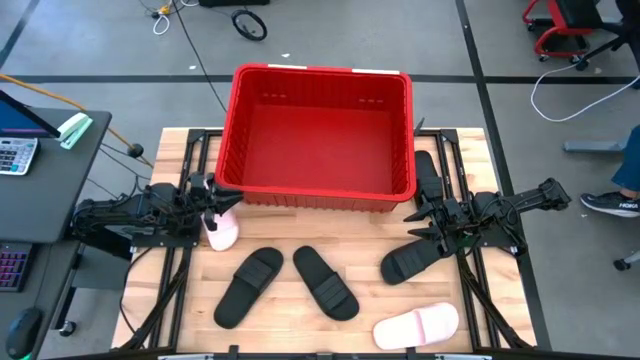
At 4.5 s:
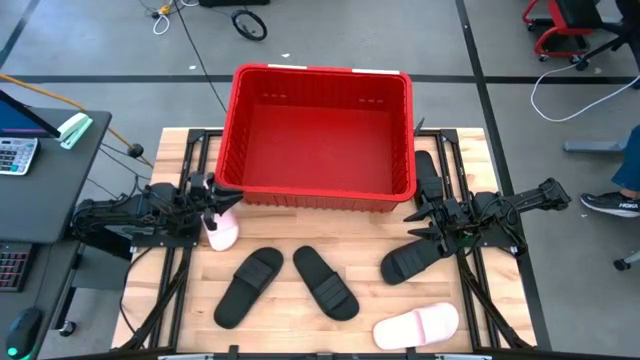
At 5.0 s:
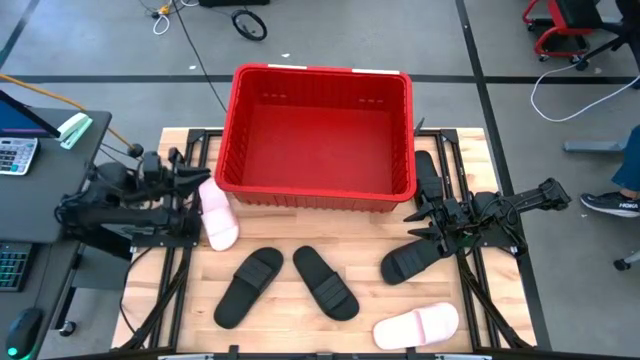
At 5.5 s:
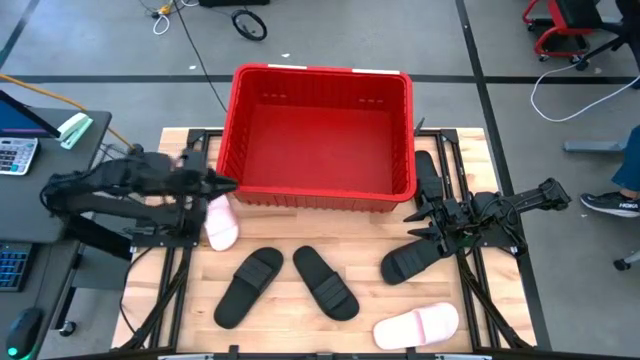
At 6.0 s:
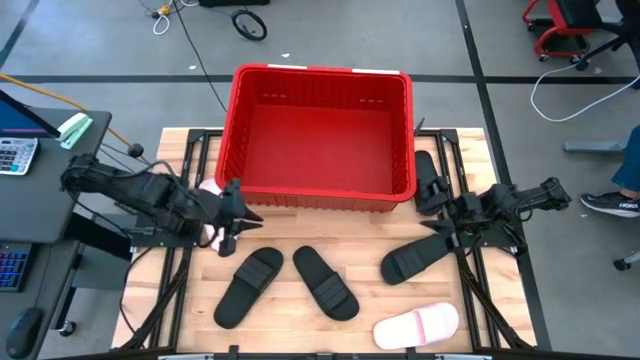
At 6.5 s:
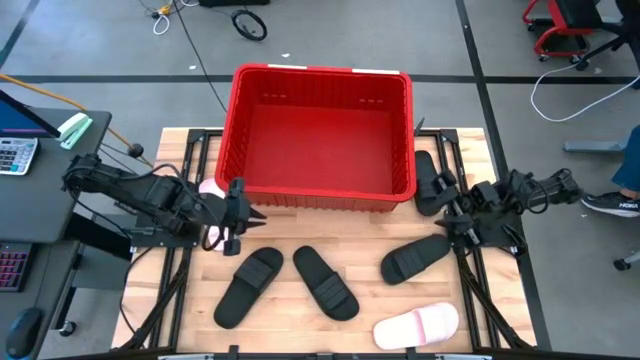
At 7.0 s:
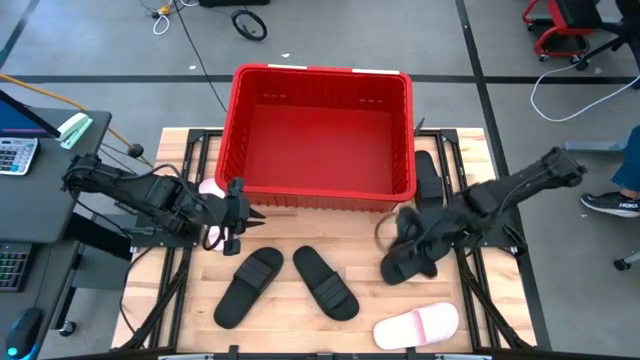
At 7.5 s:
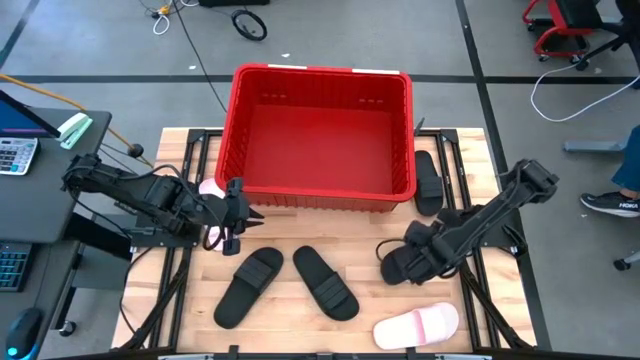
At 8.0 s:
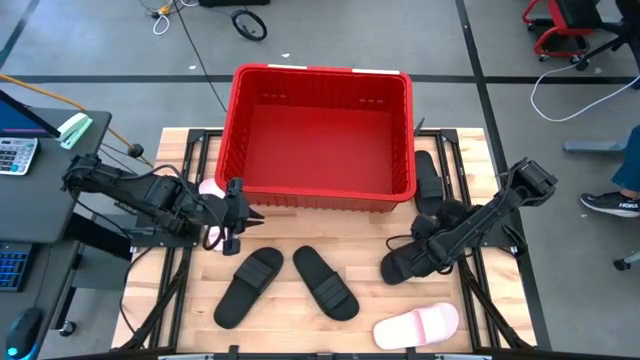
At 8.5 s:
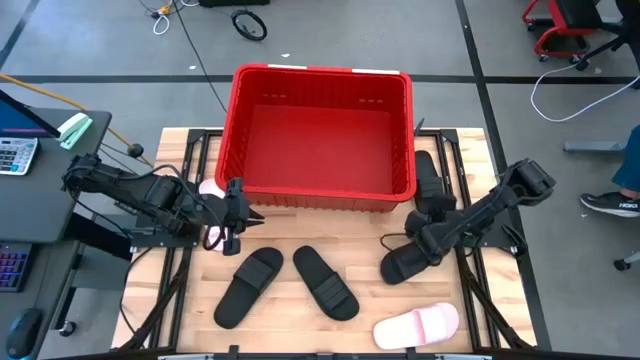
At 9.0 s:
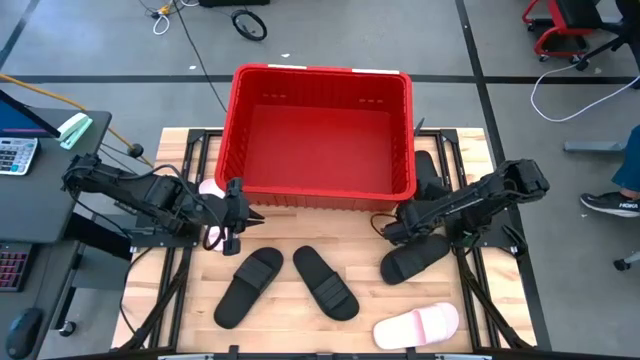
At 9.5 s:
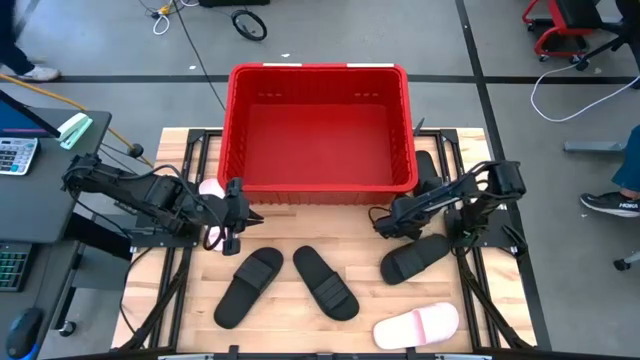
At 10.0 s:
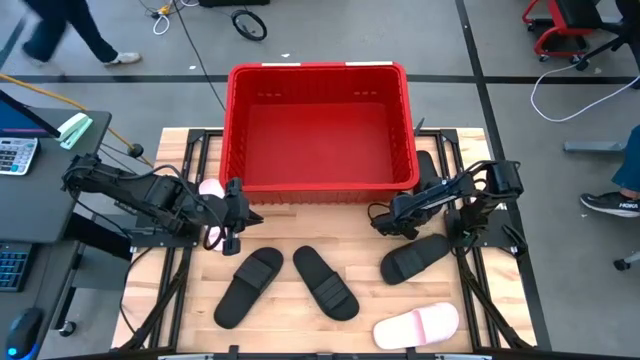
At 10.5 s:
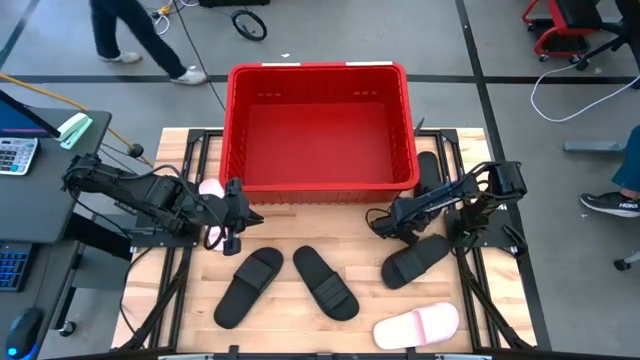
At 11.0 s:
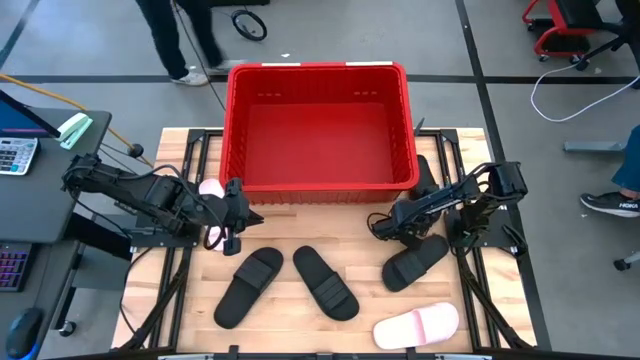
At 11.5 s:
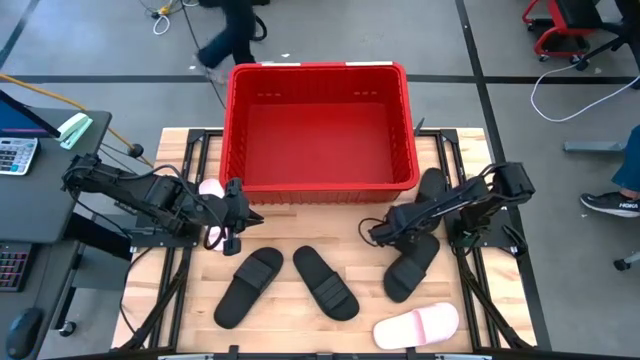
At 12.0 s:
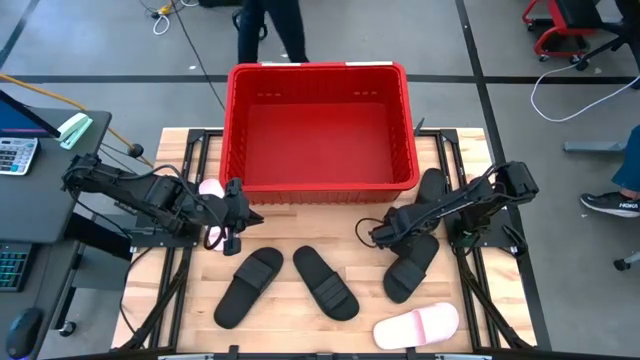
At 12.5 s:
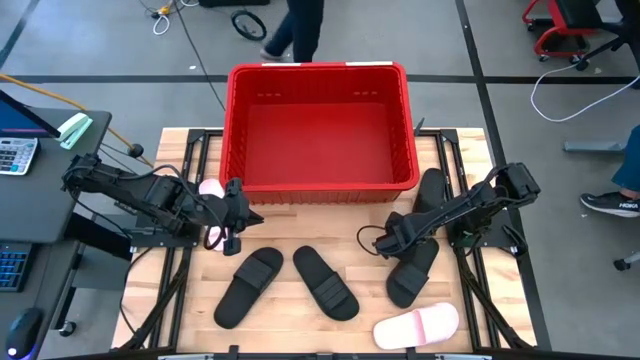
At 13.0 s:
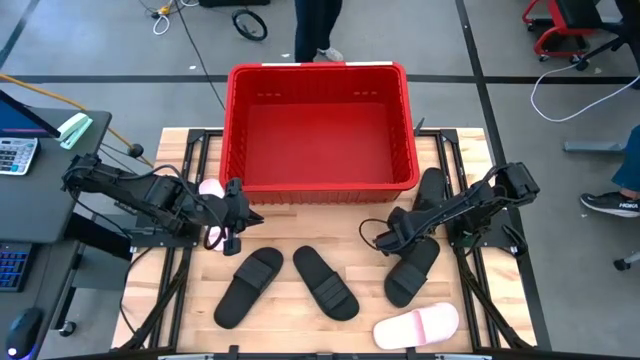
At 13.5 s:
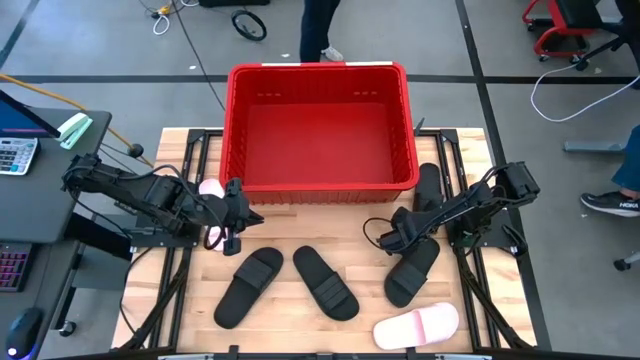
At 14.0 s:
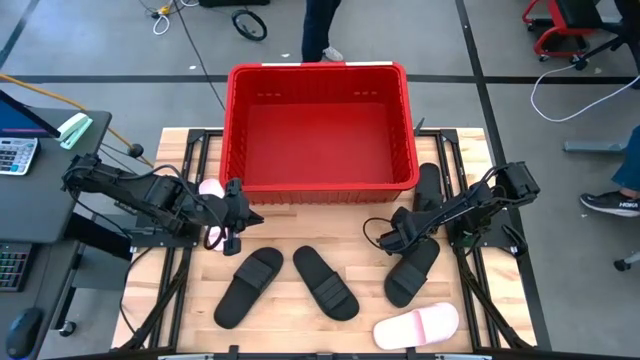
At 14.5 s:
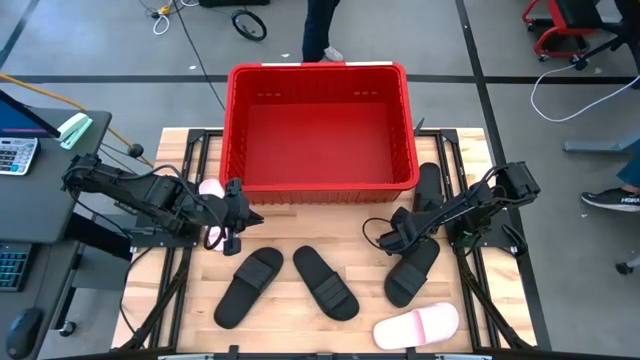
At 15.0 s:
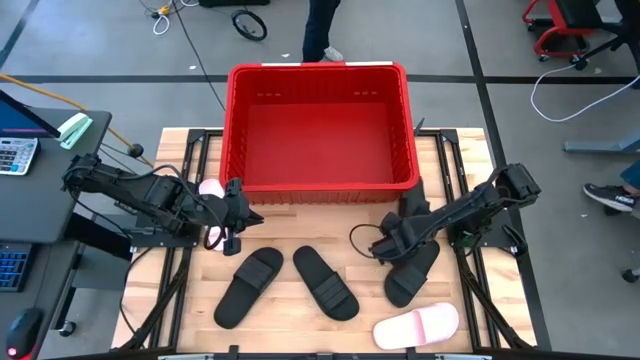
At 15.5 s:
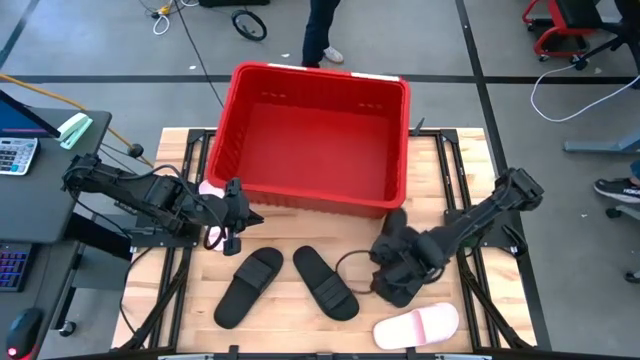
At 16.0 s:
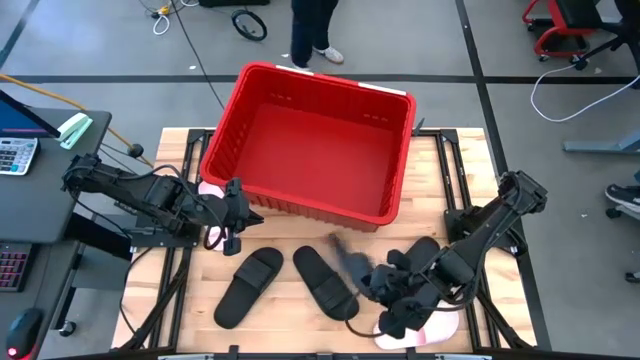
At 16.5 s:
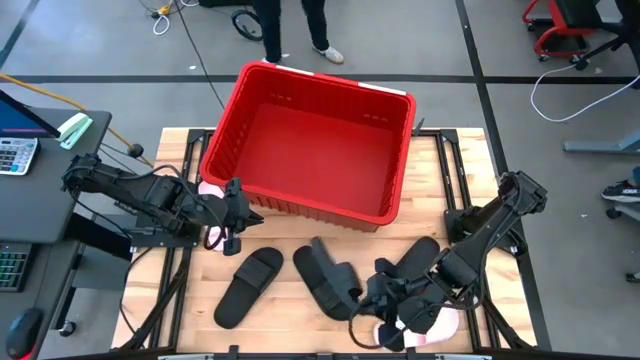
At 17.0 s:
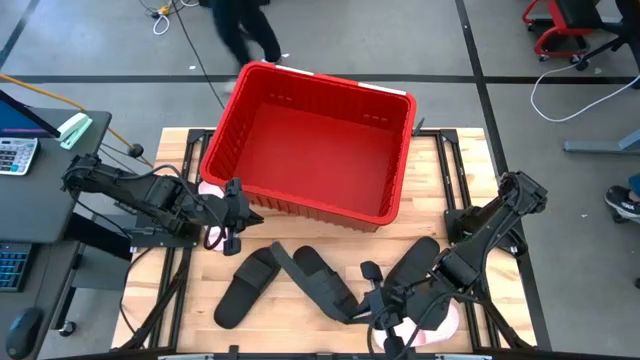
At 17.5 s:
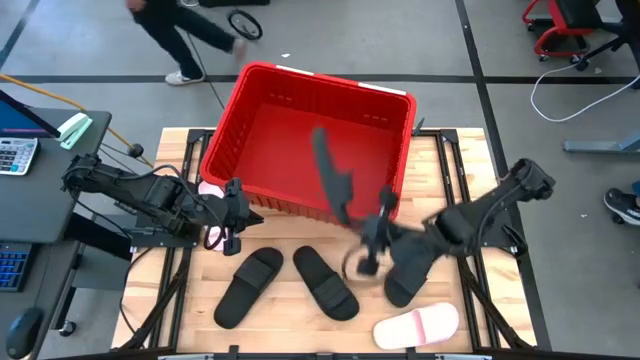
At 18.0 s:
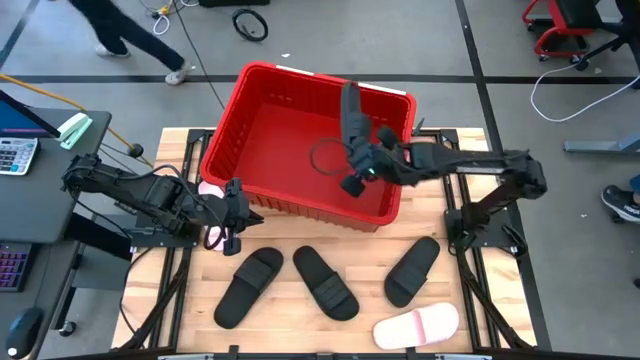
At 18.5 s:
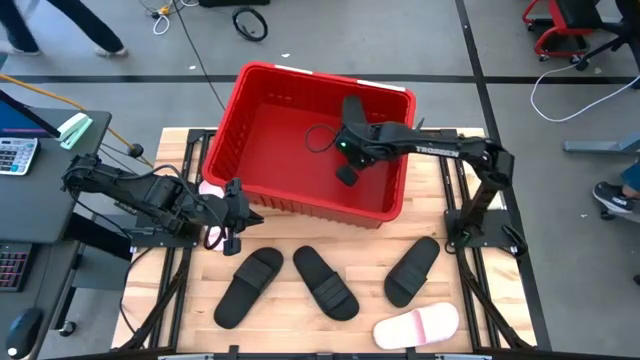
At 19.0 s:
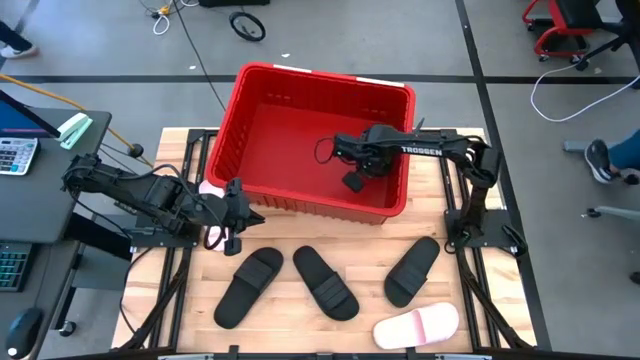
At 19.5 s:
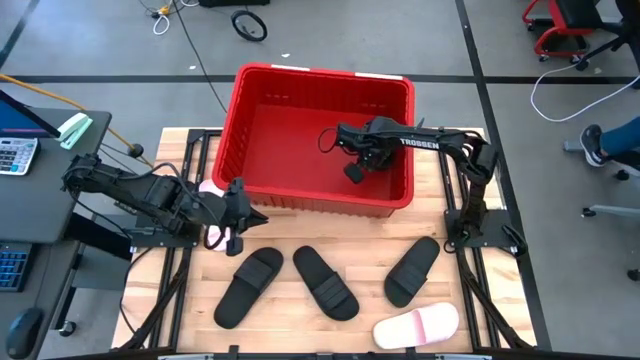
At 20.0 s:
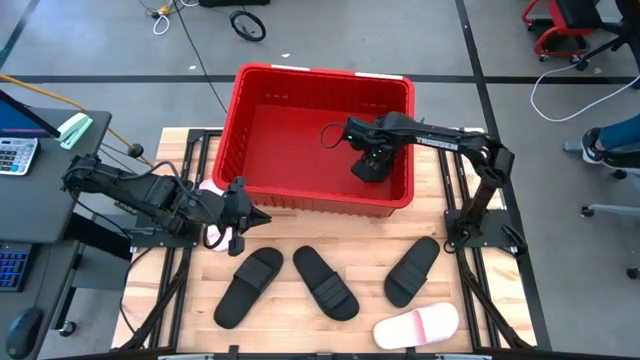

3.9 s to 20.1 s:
Task: Pick and place slides into bin
Put the black slide into the bin

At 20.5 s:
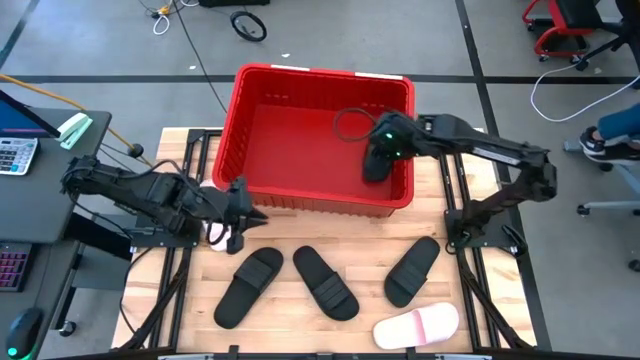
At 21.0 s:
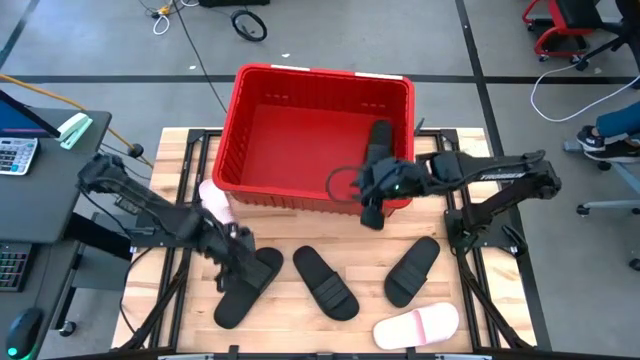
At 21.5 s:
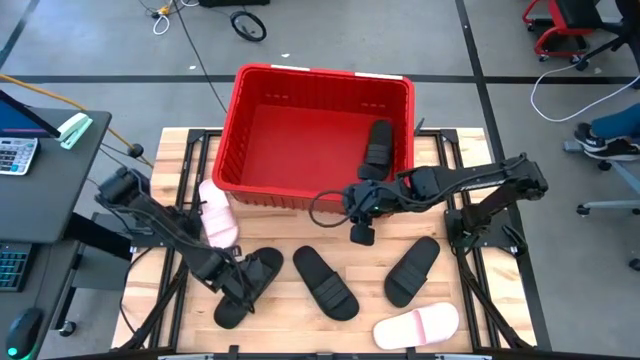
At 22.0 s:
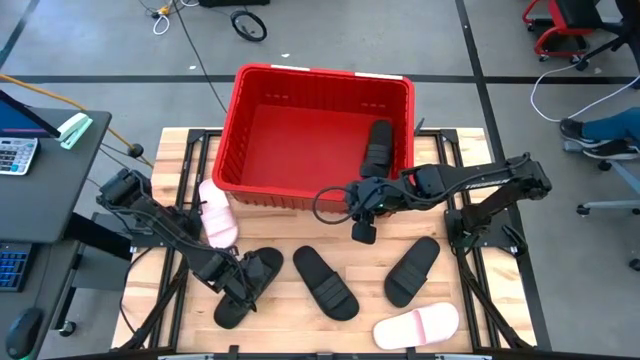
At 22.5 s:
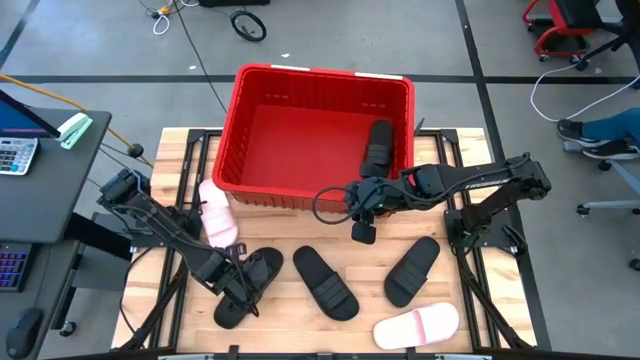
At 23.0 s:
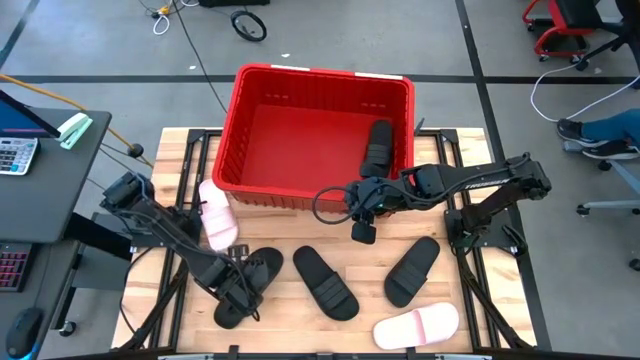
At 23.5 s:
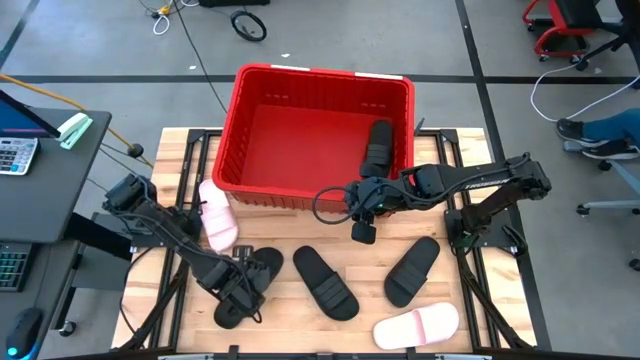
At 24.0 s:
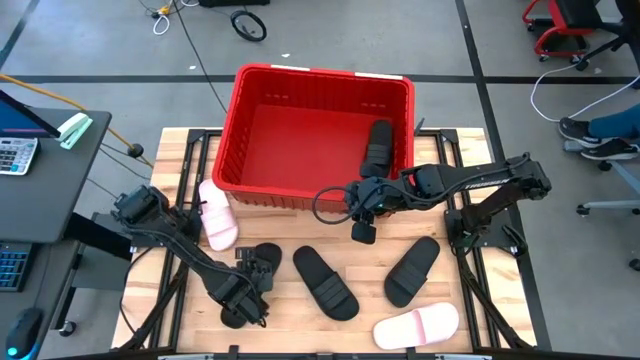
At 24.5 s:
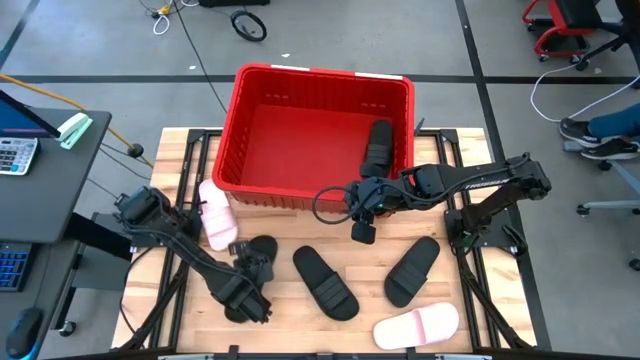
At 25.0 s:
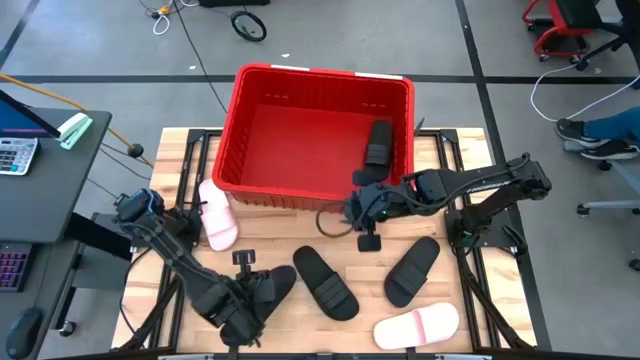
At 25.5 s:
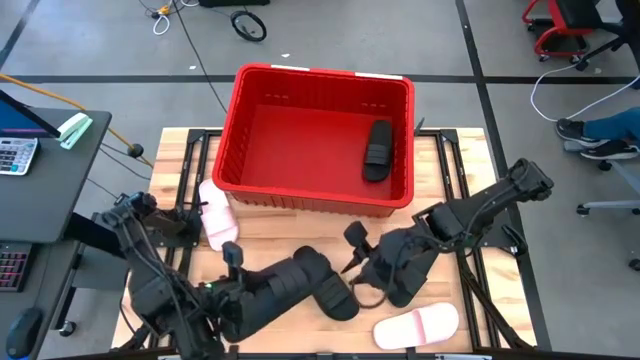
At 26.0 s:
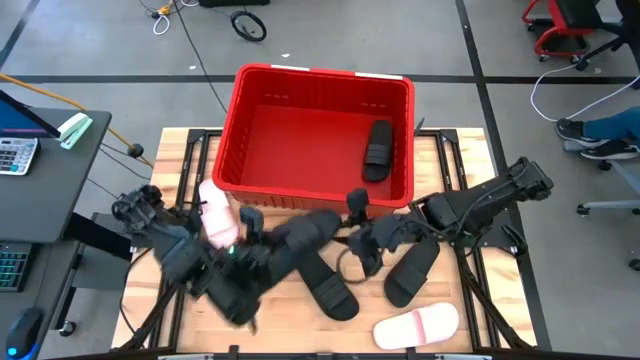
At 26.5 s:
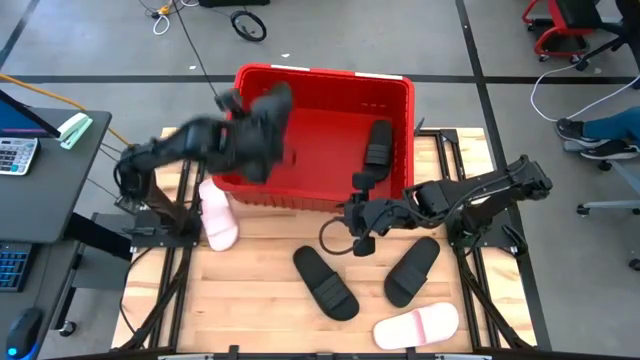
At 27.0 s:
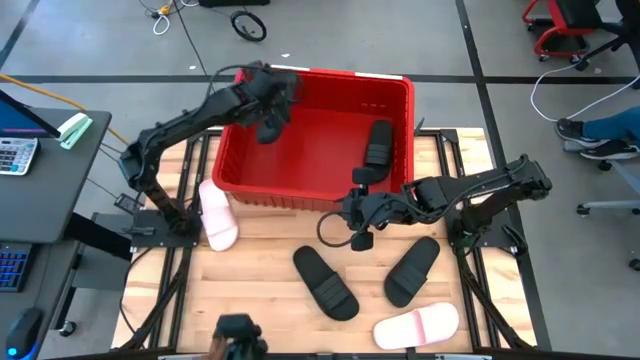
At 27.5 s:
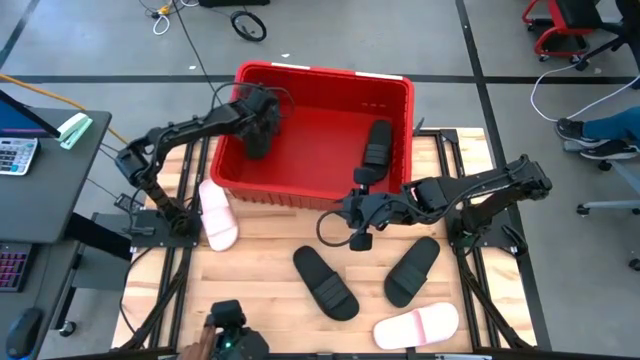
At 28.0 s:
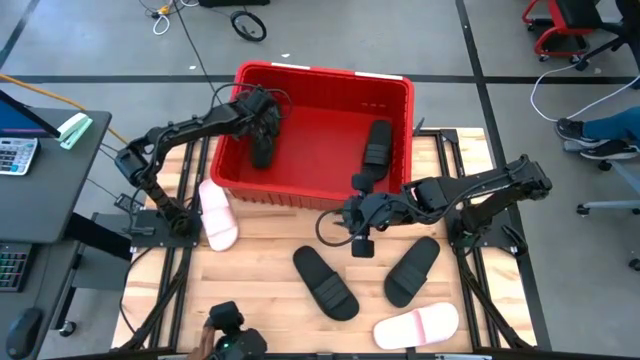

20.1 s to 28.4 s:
Put the black slide into the bin
